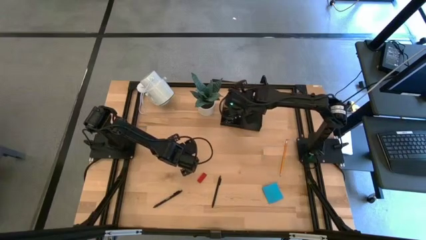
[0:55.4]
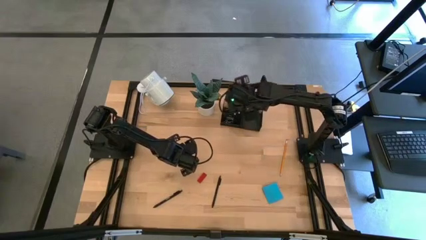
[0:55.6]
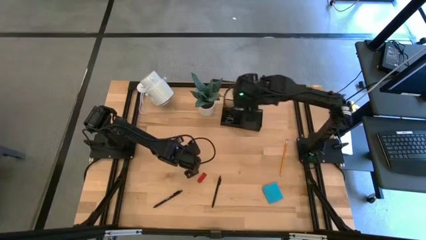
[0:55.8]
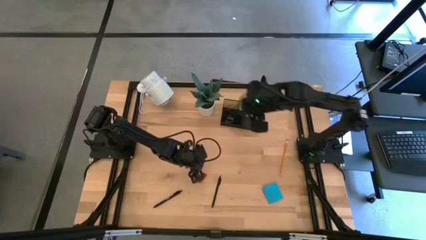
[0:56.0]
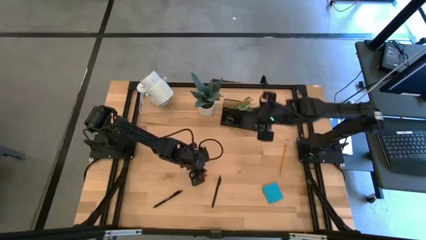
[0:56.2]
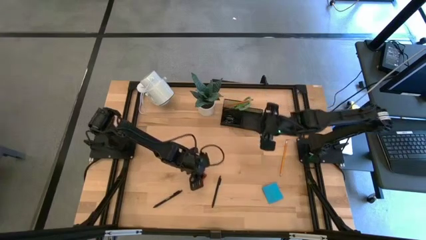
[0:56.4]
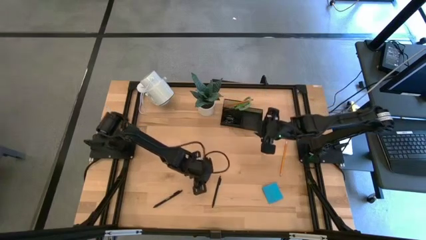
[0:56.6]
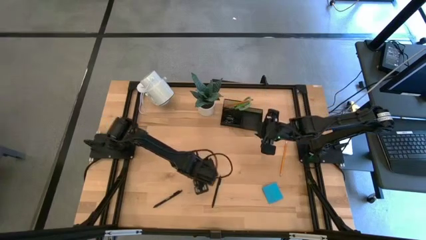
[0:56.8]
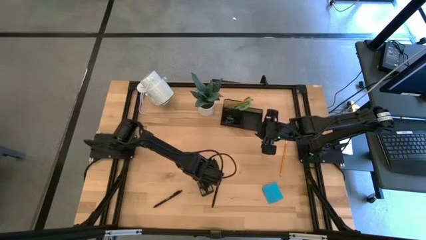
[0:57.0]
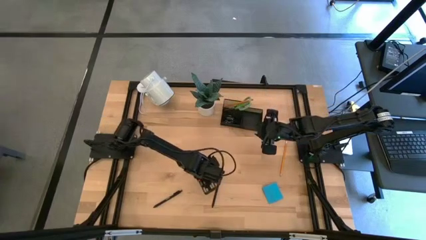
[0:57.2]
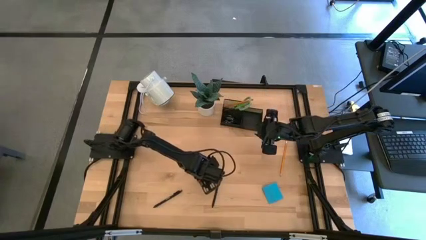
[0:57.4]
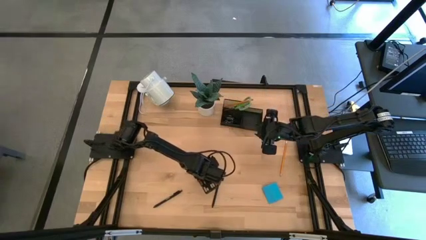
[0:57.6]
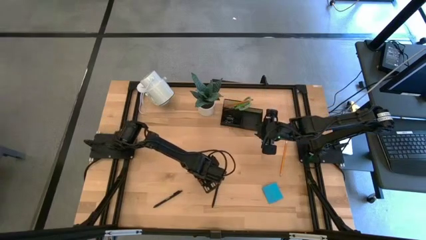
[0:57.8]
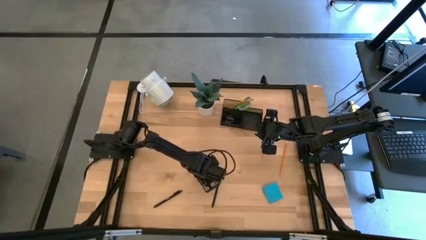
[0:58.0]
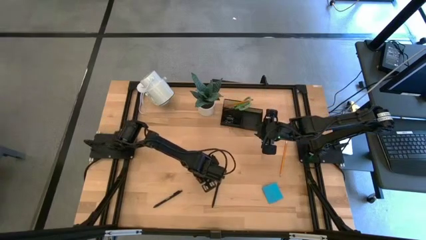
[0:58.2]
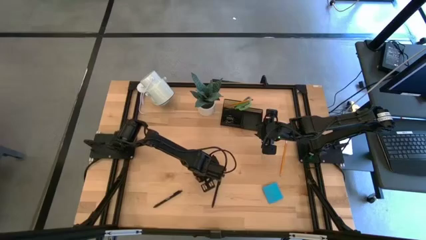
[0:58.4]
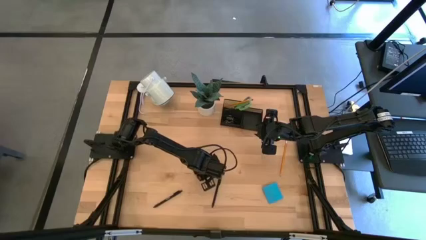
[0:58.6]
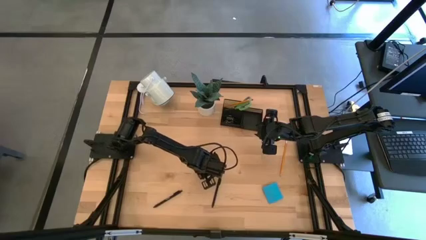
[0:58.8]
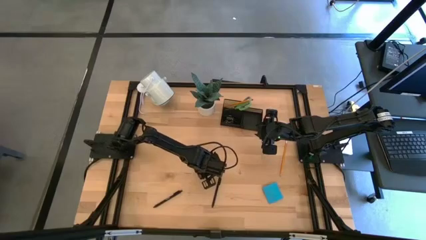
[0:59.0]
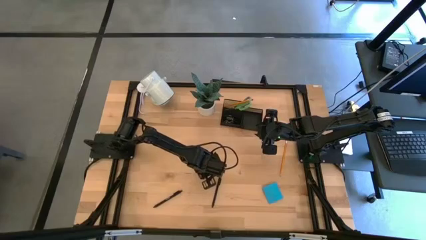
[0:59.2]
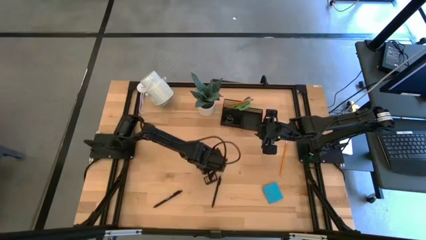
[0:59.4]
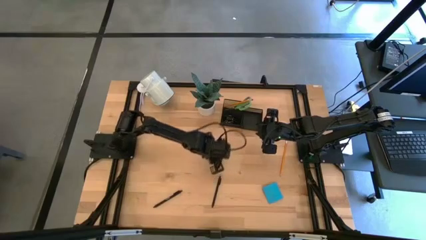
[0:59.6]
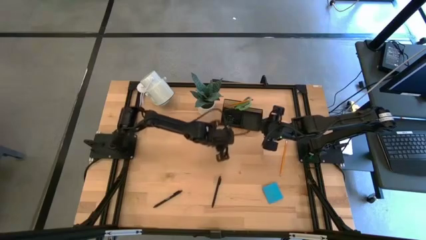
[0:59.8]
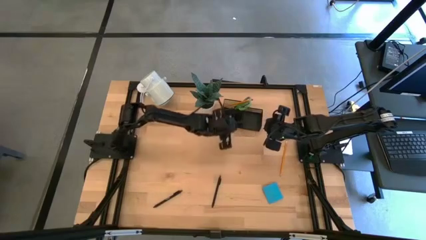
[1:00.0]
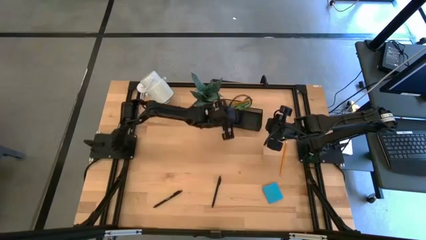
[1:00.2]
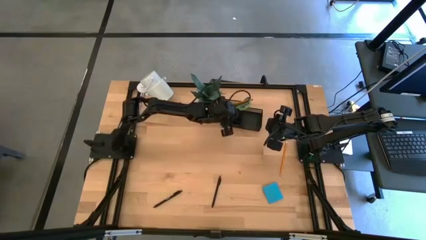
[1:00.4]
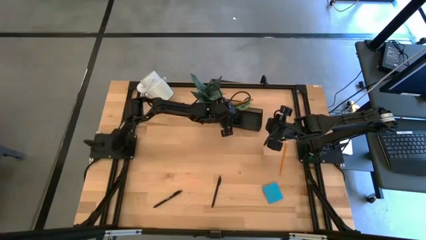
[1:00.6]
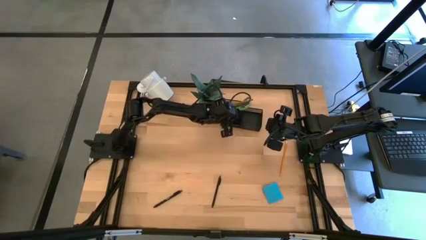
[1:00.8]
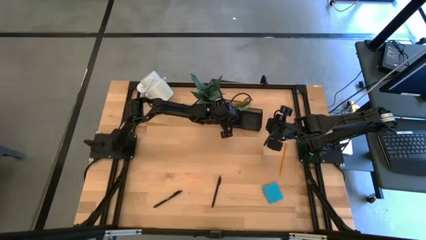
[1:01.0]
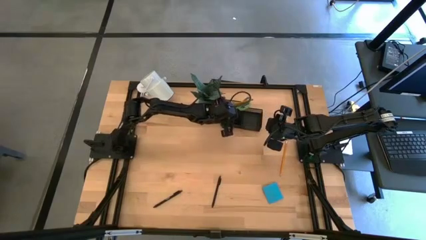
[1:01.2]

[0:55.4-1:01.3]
Task: Pick and place office supplies into organizer
Put the red eraser into the desk organizer

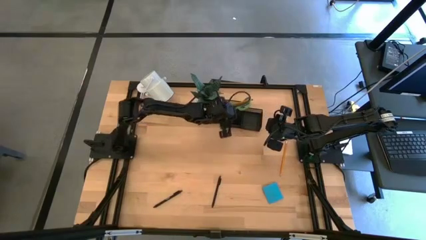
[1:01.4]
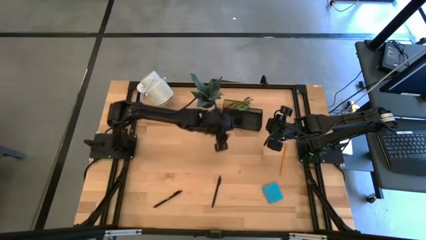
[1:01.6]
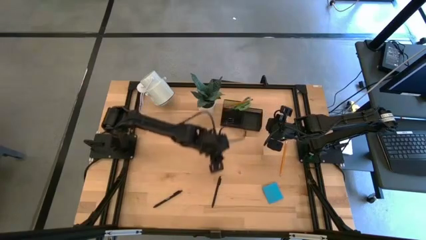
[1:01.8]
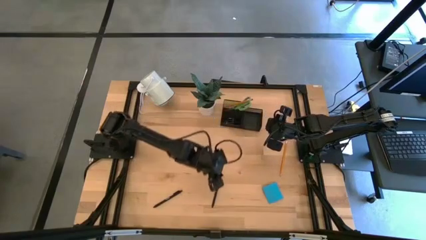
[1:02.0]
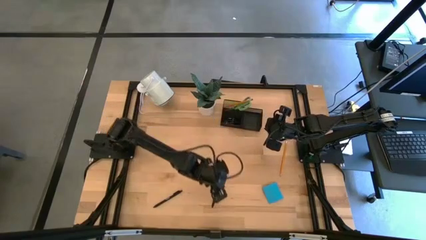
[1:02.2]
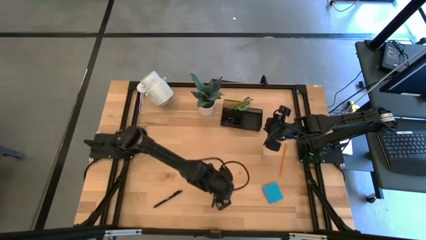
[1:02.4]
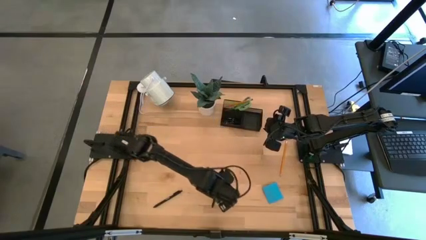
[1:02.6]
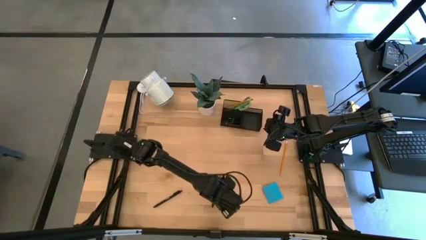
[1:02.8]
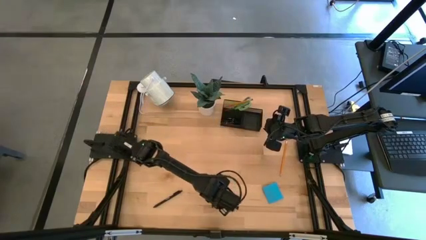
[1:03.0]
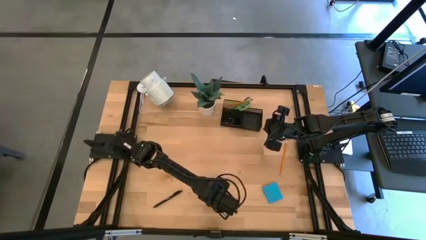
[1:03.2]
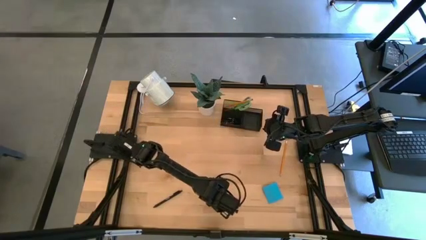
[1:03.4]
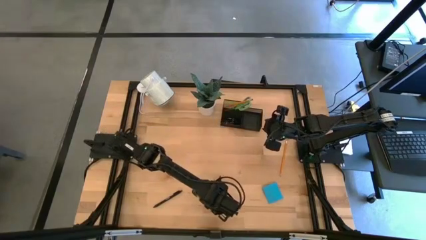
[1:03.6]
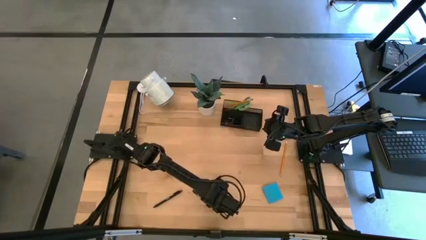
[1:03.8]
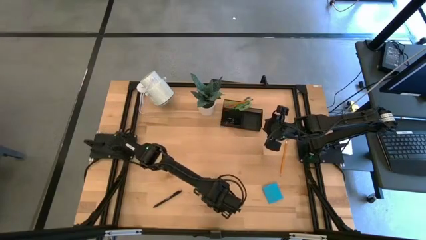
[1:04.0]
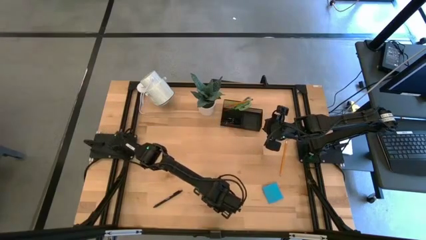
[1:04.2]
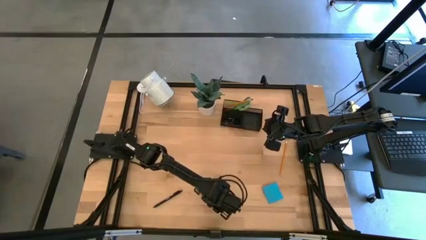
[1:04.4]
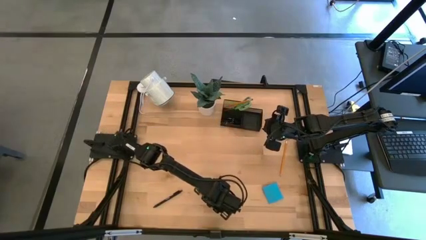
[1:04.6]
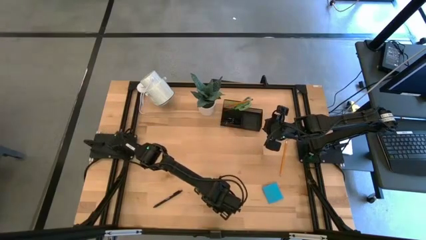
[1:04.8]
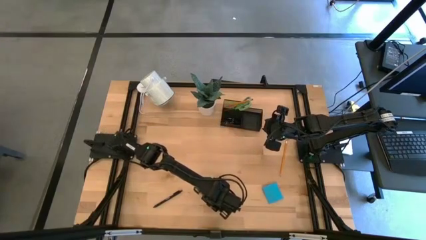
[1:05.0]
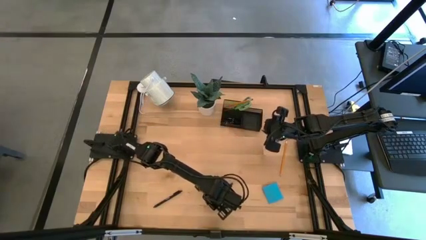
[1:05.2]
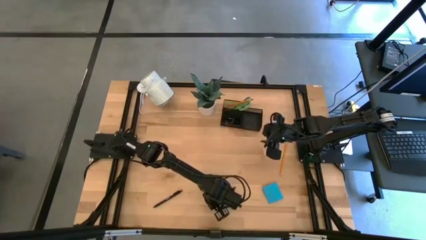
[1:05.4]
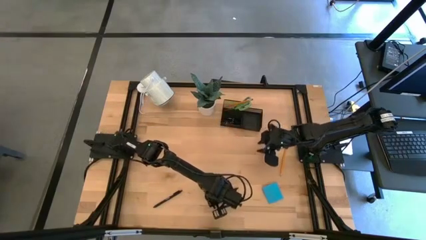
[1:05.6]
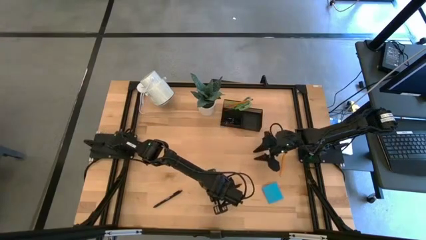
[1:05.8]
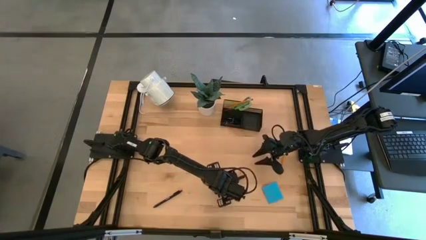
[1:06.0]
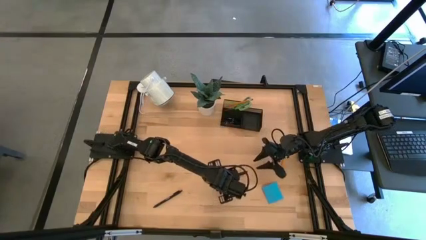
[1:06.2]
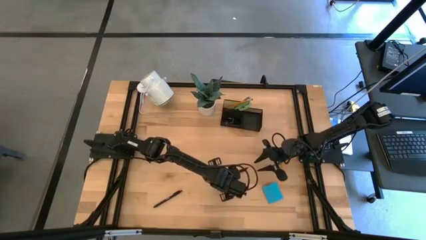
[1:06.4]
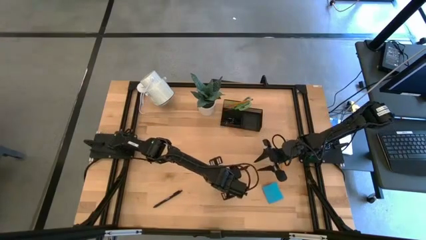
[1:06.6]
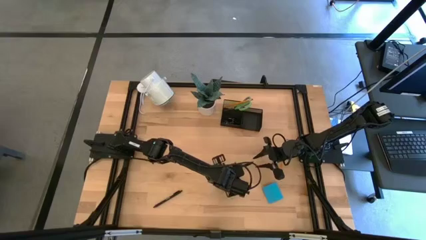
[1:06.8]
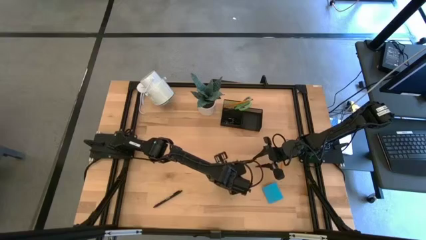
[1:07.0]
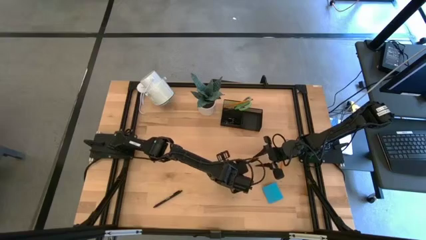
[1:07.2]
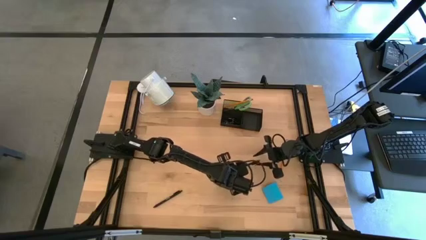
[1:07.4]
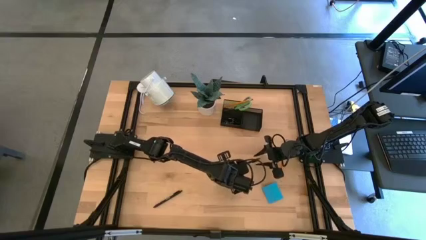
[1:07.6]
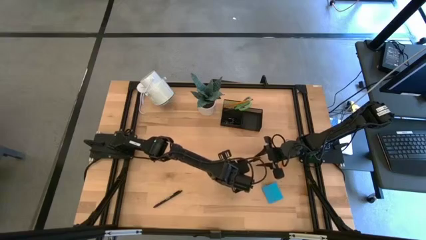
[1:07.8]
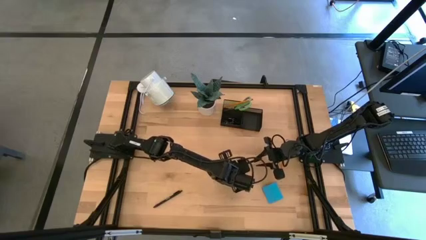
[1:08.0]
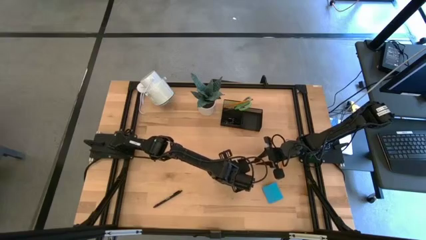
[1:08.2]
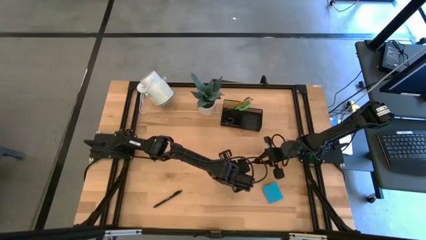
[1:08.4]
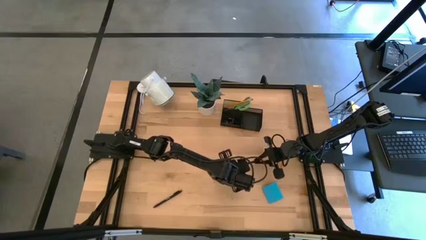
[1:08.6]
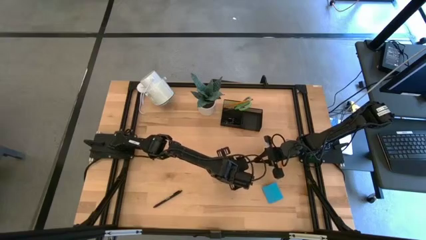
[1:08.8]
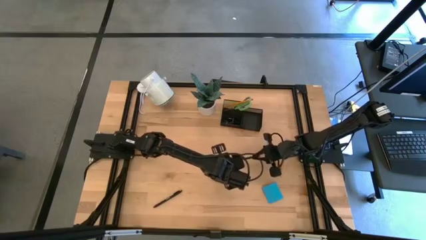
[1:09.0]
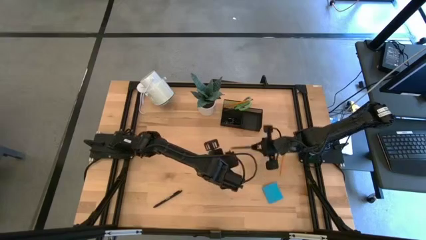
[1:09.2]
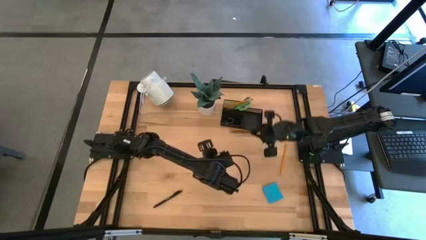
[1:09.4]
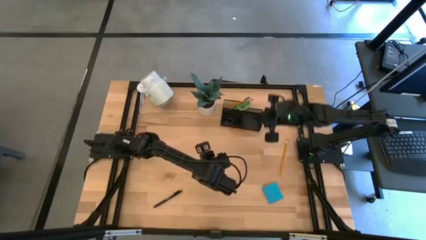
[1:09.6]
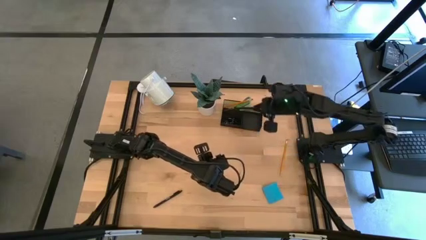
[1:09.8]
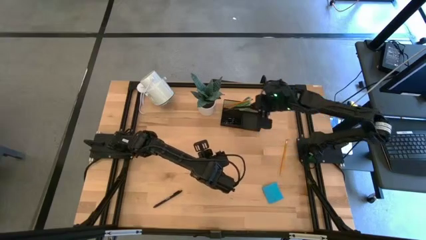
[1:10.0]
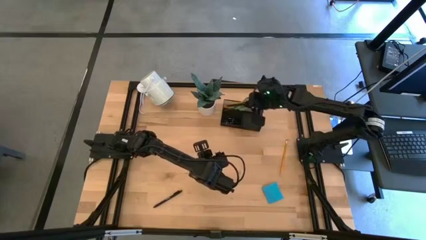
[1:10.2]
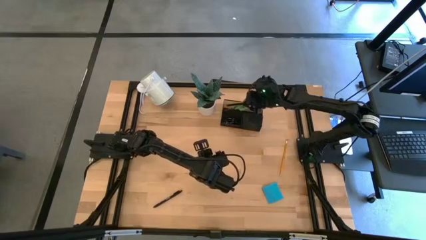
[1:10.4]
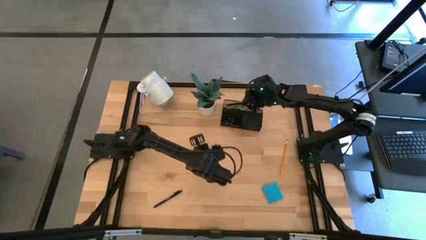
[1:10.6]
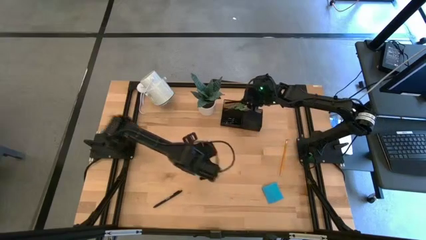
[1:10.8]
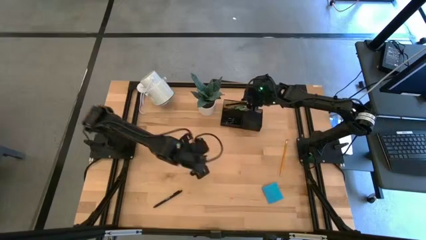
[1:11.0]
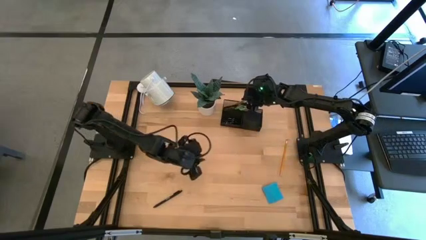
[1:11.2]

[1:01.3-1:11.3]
Put the right black pen into the desk organizer
